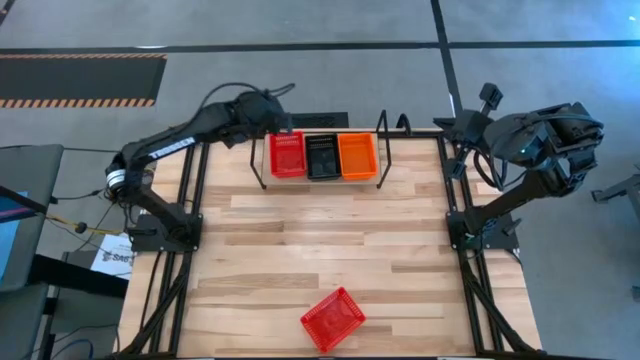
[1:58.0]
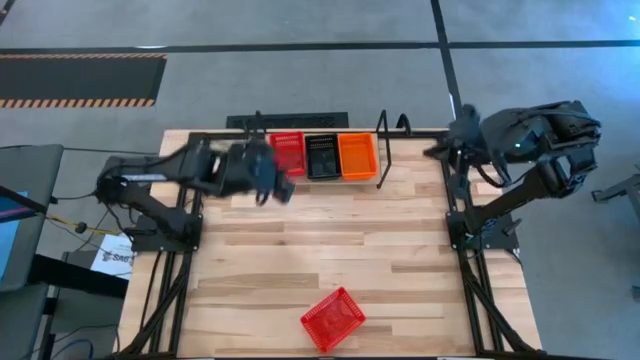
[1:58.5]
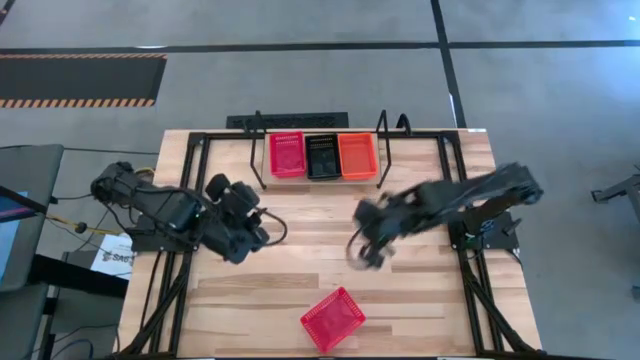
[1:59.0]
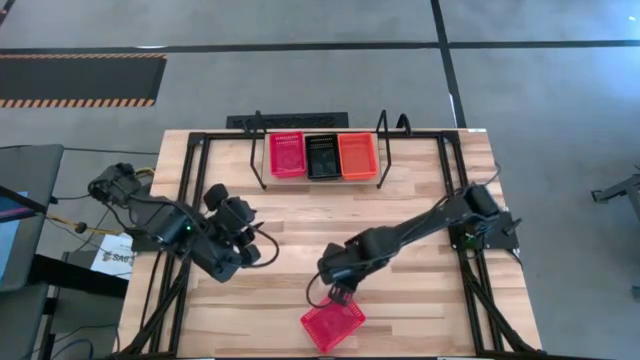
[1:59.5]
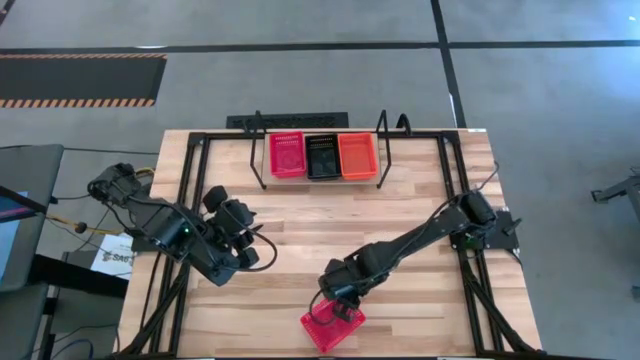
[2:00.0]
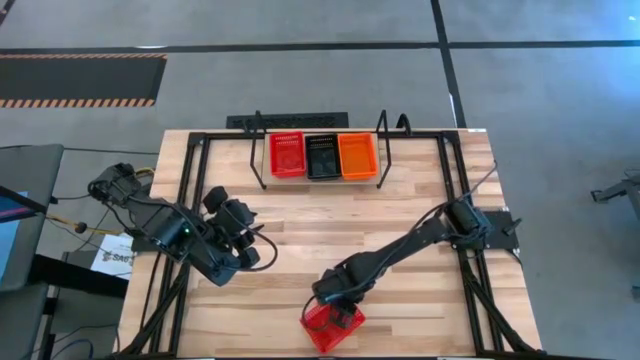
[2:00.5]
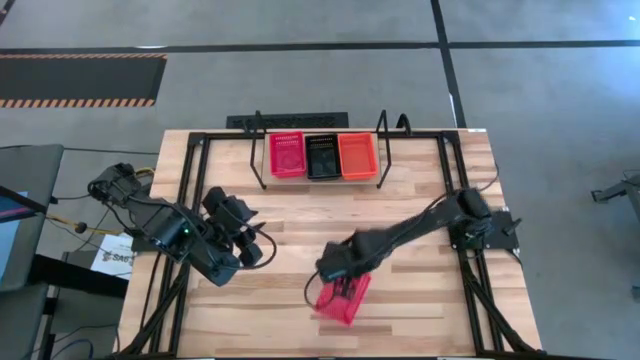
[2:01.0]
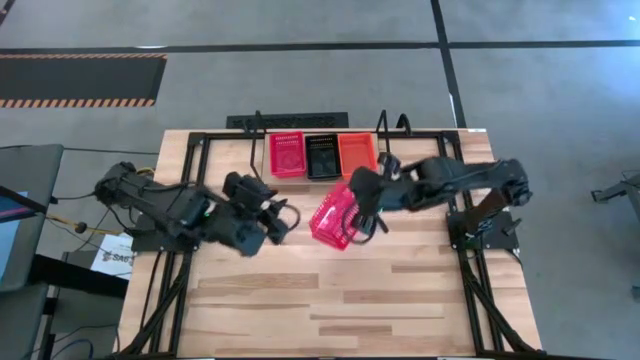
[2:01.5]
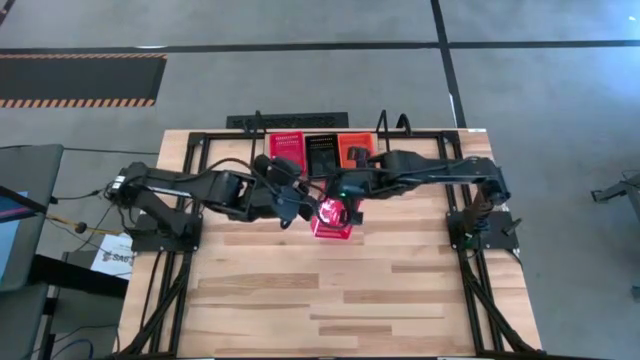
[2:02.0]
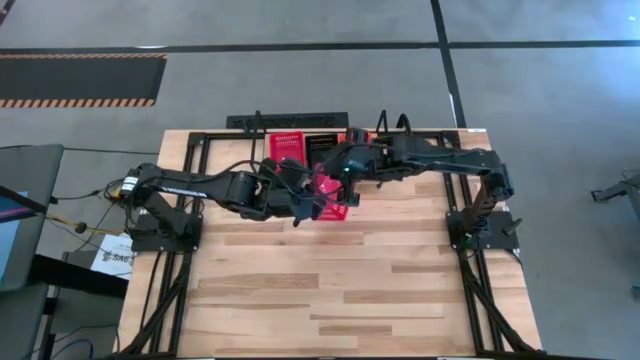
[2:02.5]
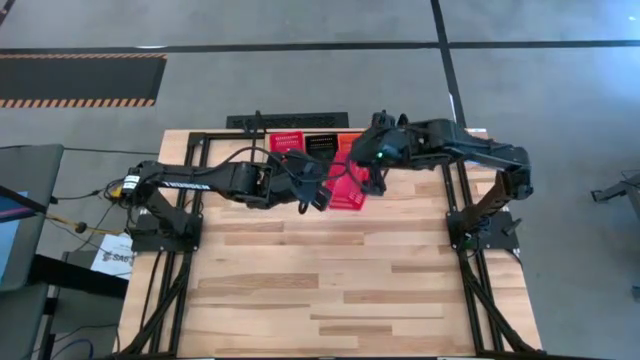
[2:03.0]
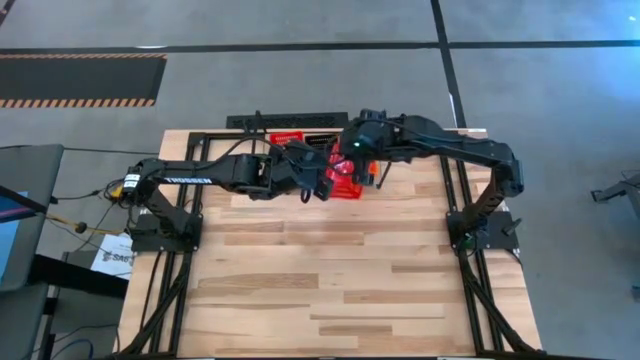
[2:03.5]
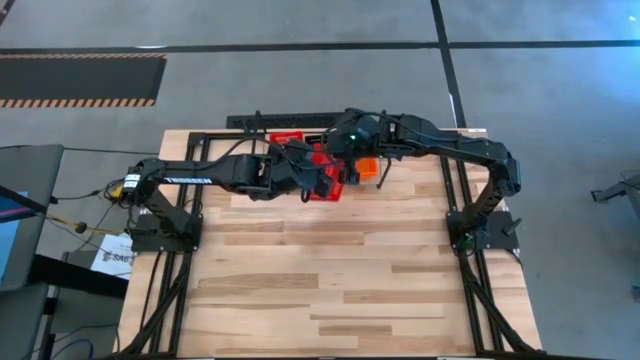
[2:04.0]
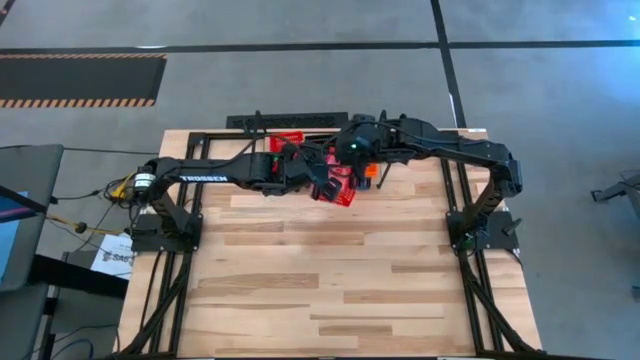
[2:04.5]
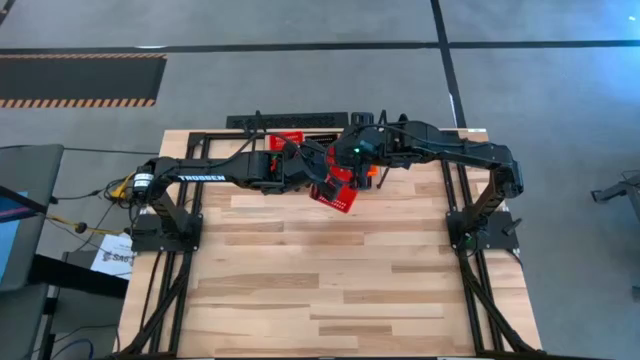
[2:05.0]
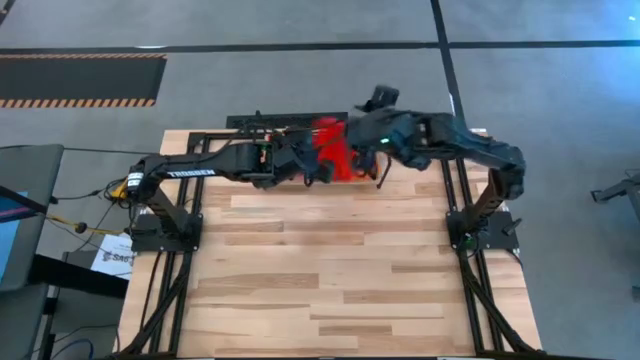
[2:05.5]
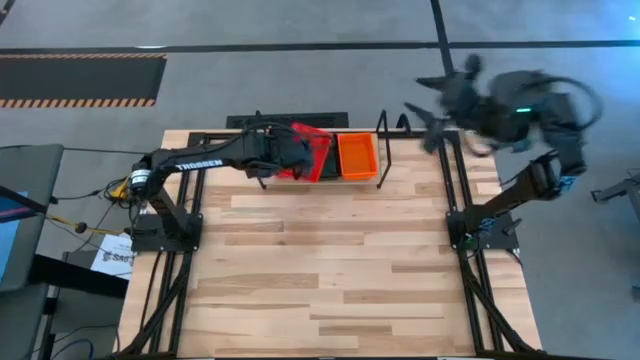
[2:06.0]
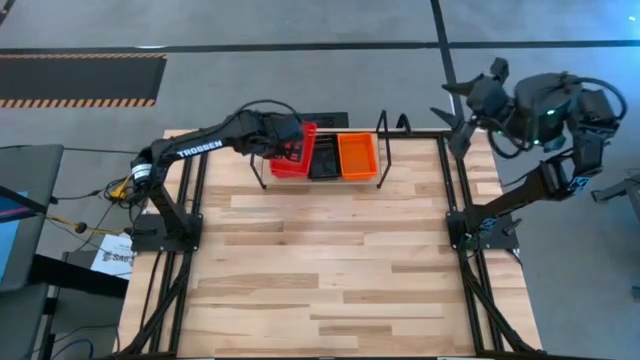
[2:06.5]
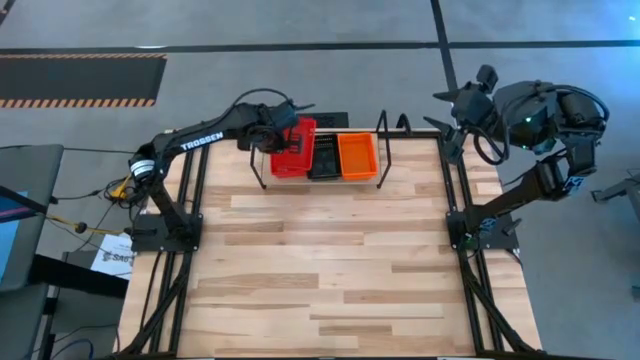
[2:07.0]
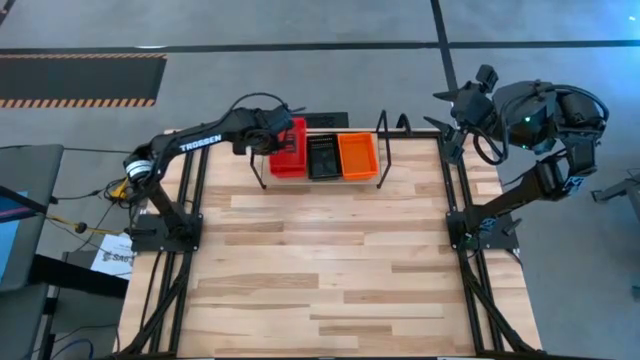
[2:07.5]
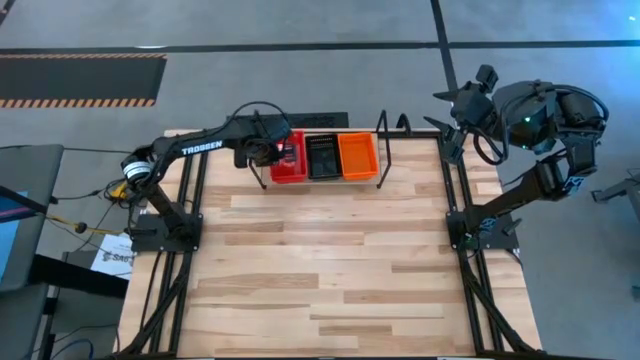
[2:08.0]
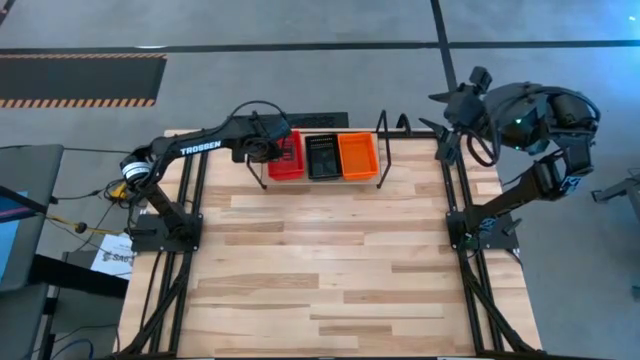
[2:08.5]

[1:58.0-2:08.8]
Task: Stack baskets on shelf by color
Stack the red bin on top of the red bin on the shelf

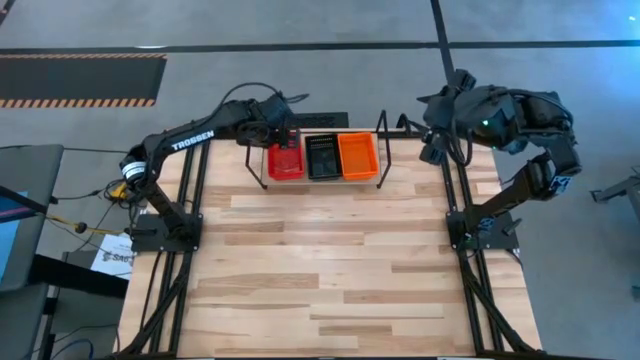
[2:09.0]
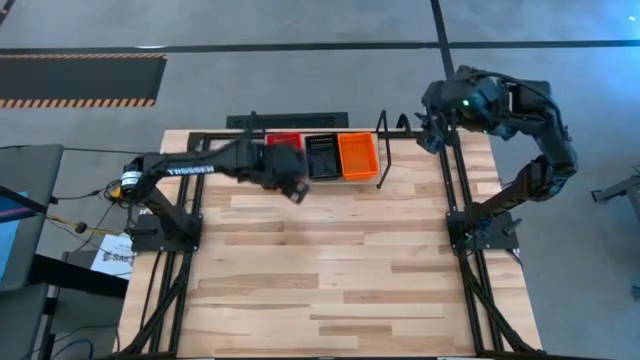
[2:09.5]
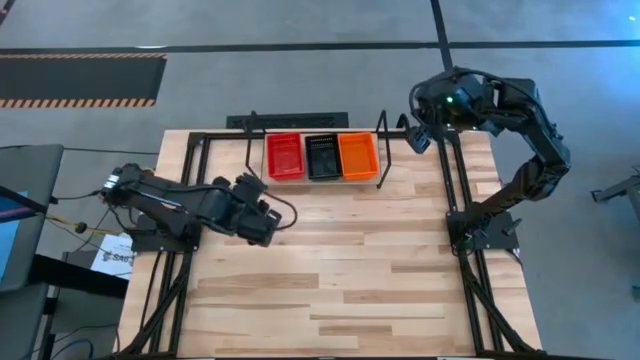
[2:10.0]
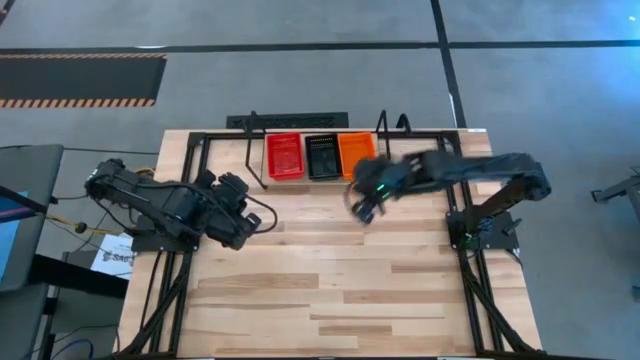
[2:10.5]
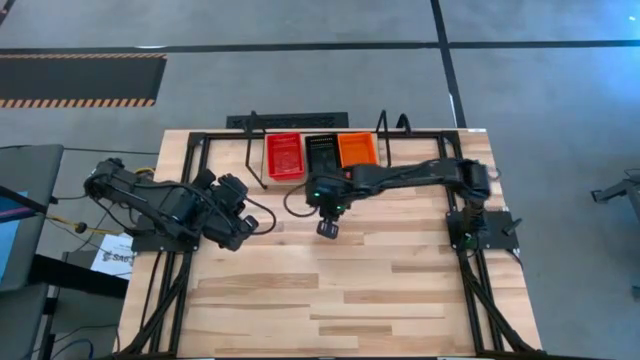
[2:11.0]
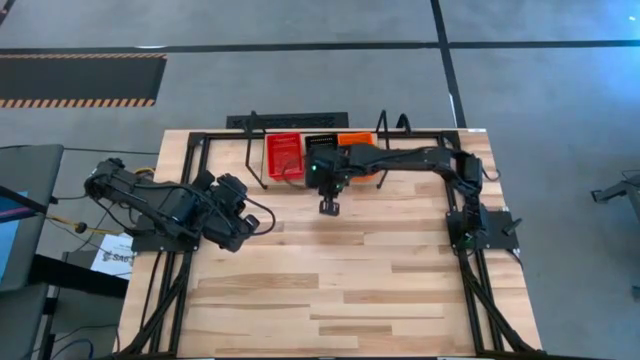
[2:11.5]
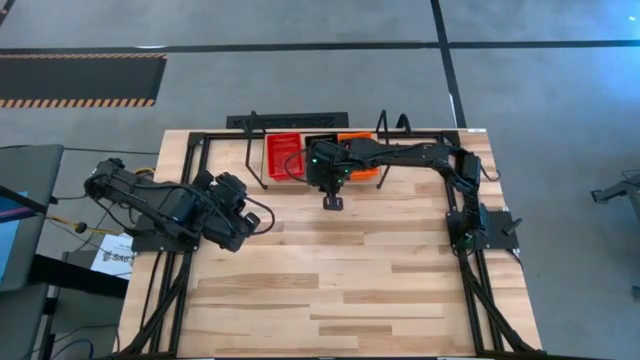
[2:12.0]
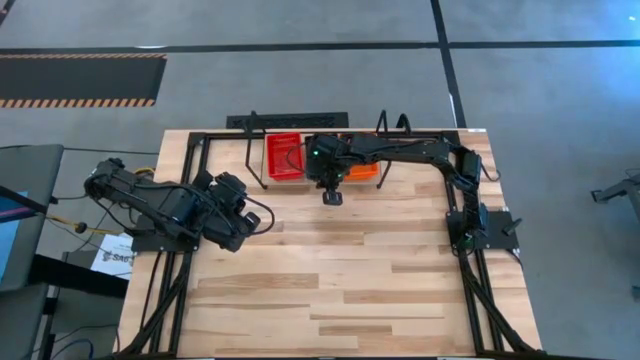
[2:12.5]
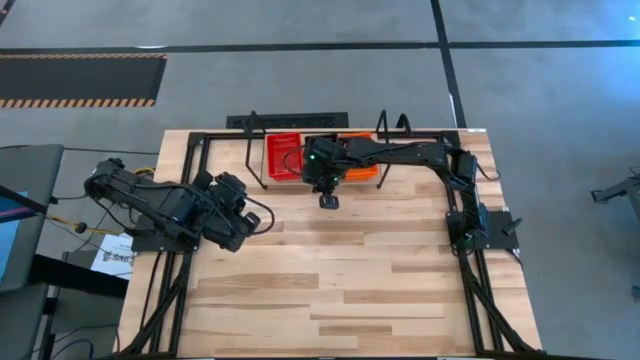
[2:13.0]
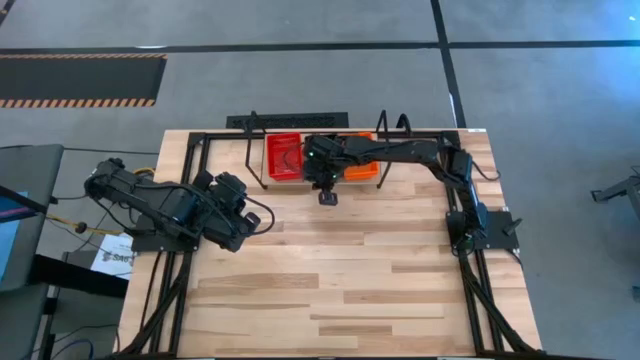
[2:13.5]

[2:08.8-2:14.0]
Adjust the stacked black bins on the shelf

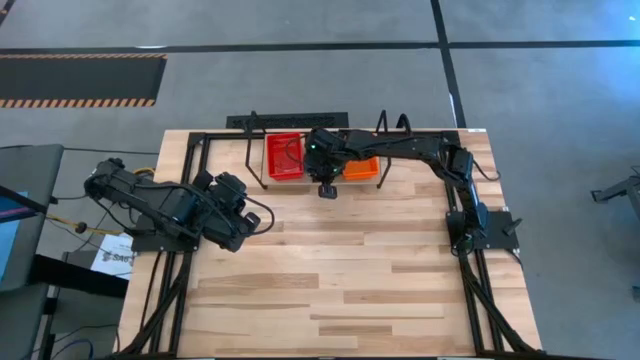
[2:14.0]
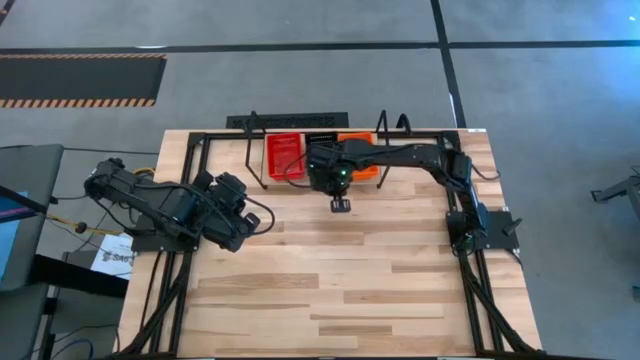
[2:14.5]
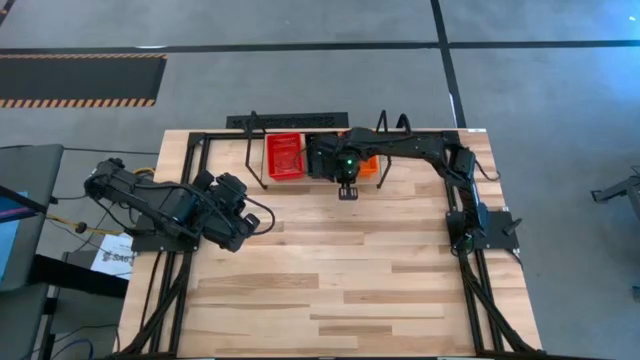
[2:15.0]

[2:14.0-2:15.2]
Adjust the stacked orange bins on the shelf

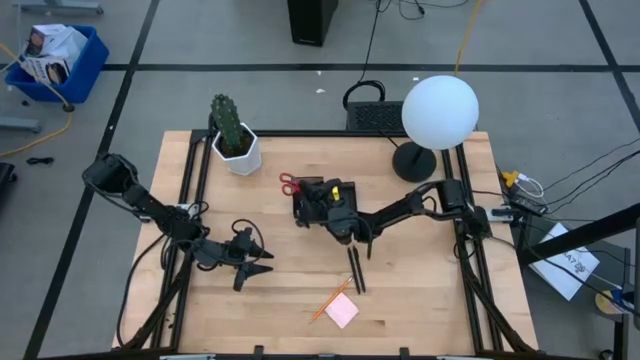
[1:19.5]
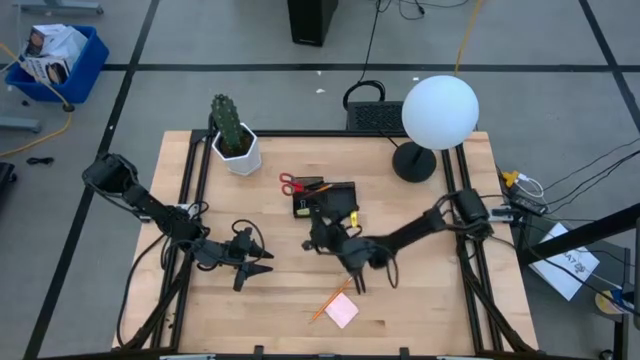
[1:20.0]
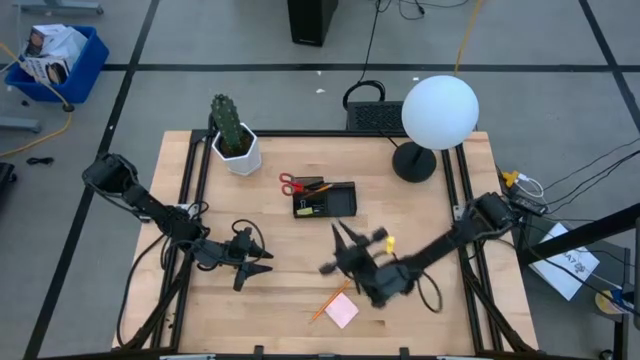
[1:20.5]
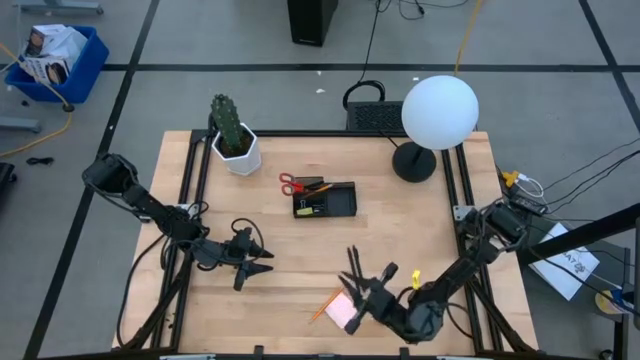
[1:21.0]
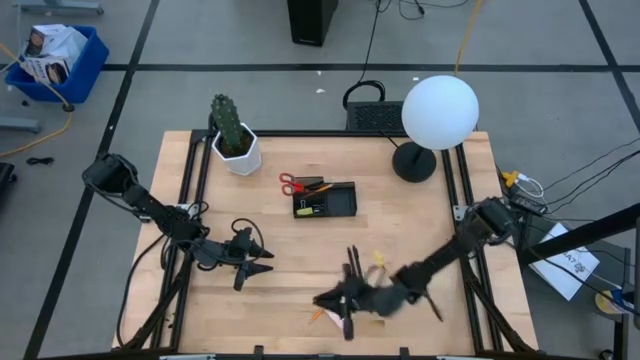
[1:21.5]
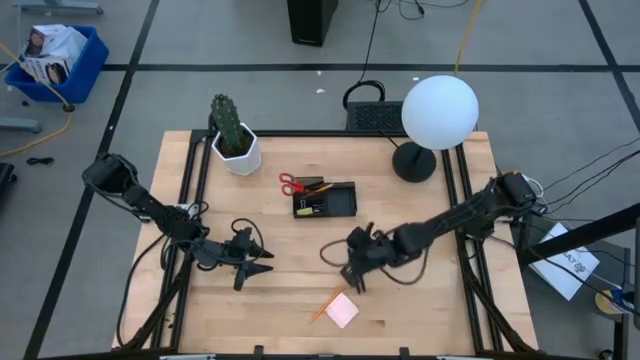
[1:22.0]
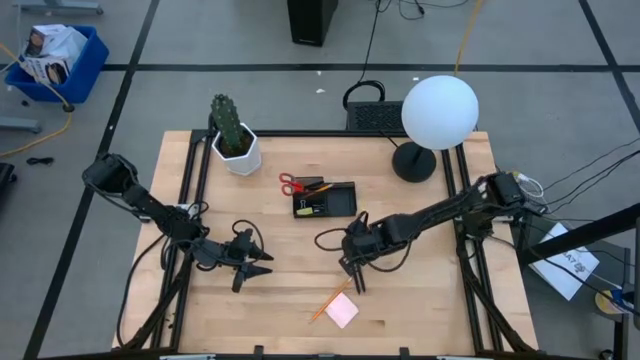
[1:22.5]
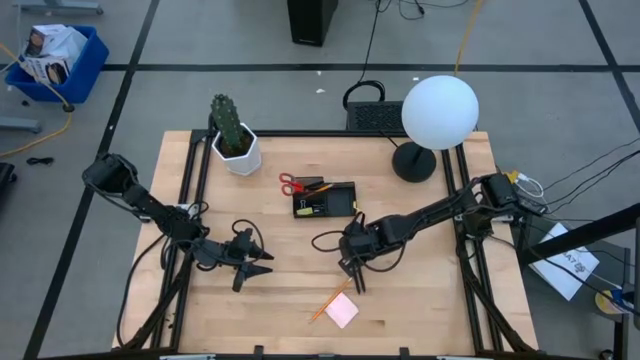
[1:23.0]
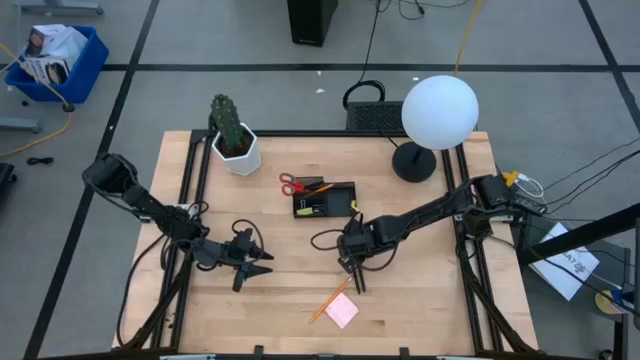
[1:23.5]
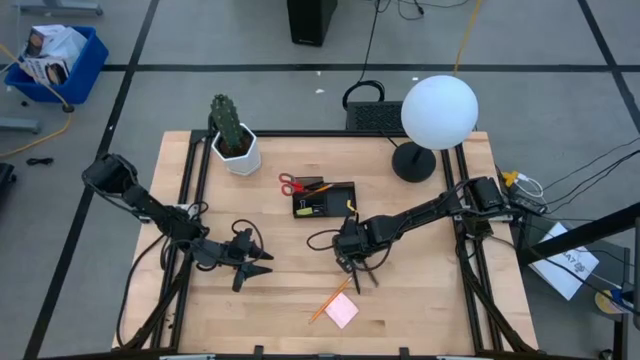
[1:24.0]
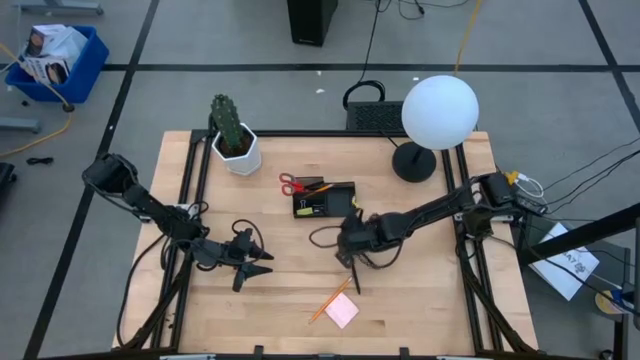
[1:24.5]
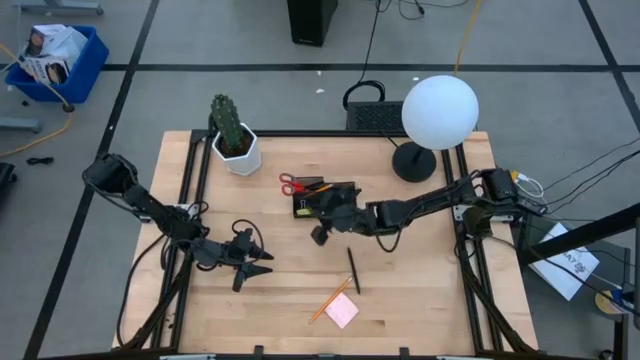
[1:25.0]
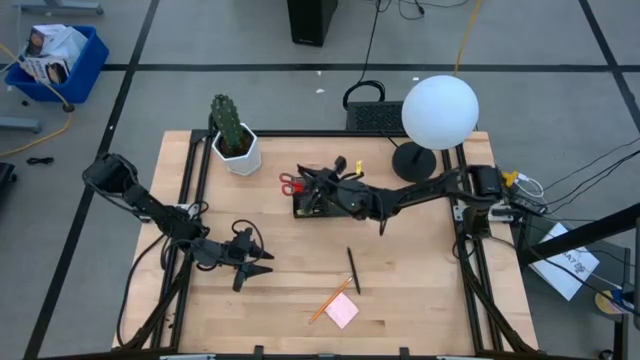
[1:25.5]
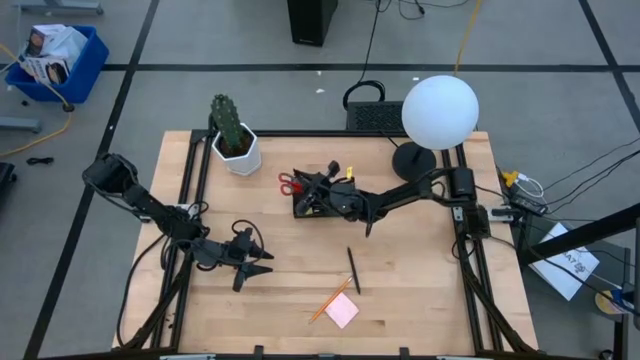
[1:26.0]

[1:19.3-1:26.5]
Task: Pick and place office supplies into organizer
Put the right black pen into the top left of the desk organizer
